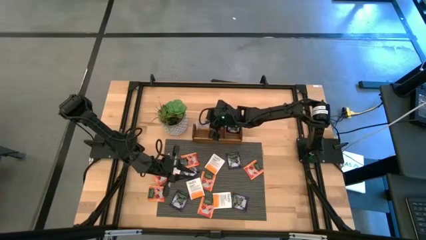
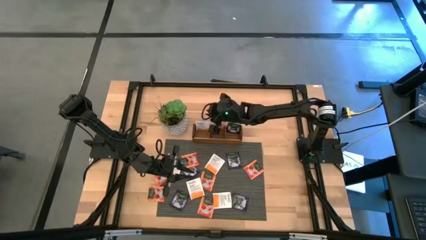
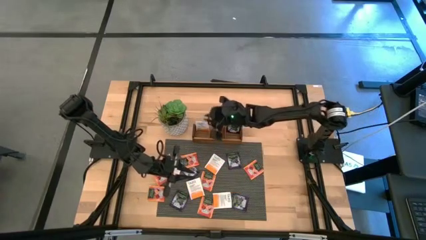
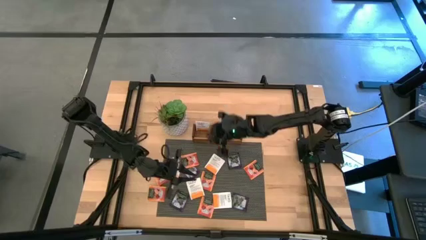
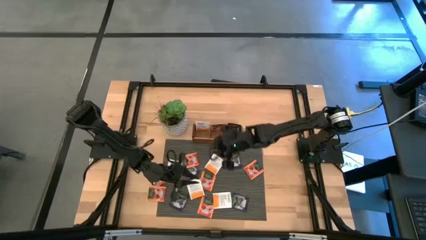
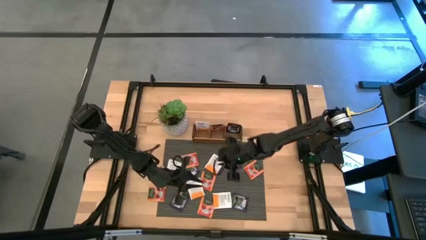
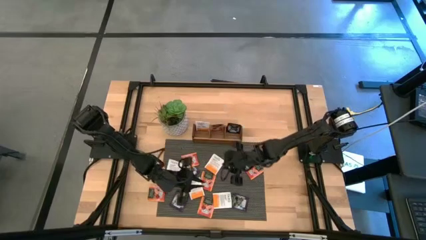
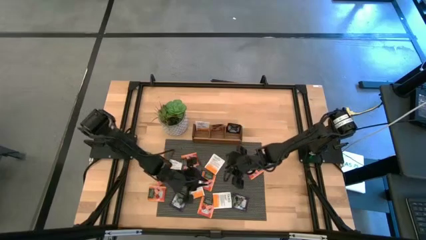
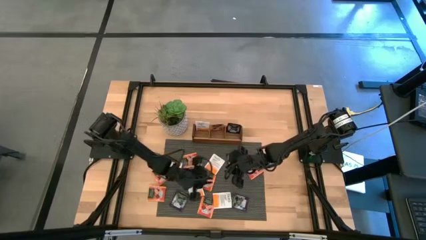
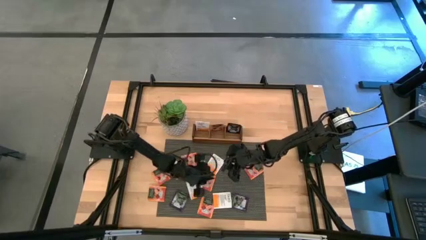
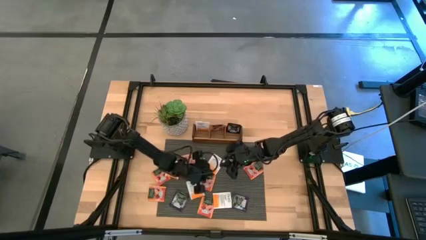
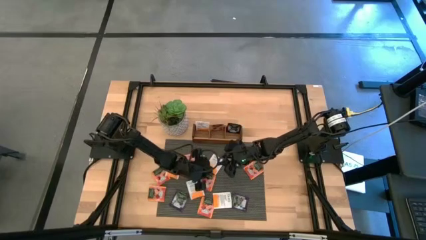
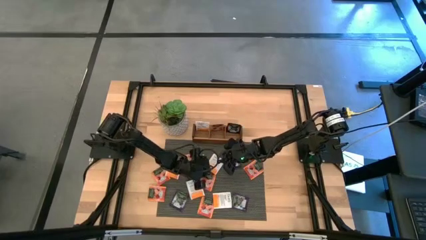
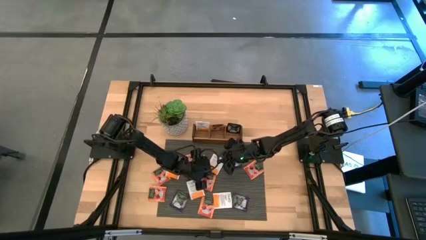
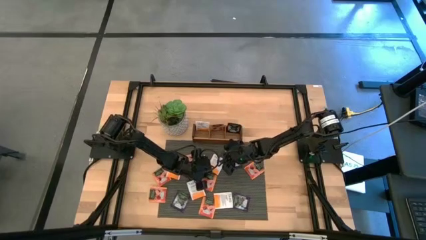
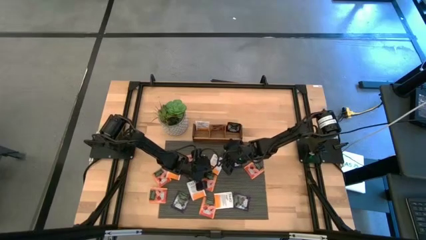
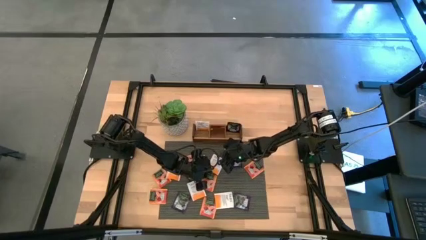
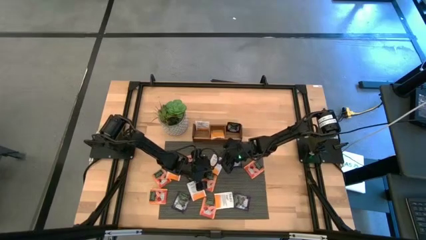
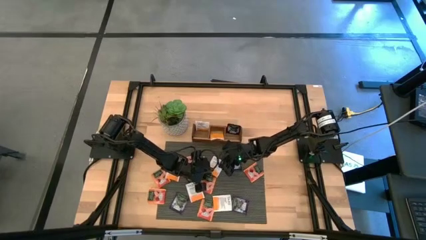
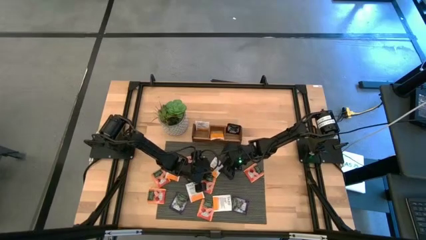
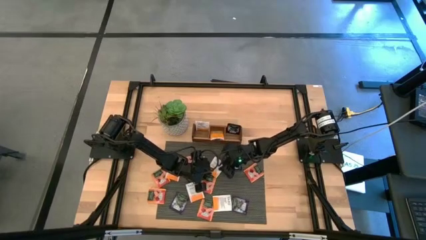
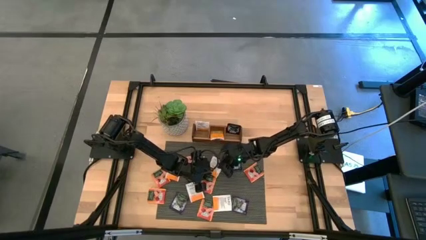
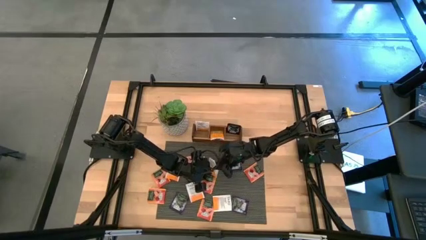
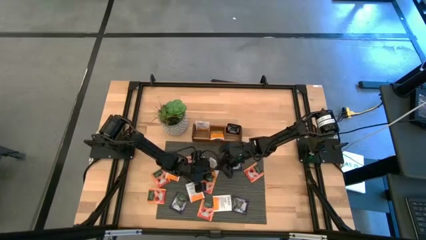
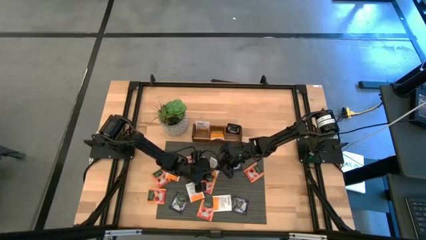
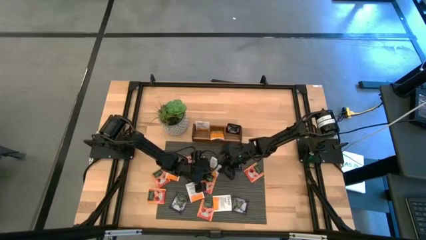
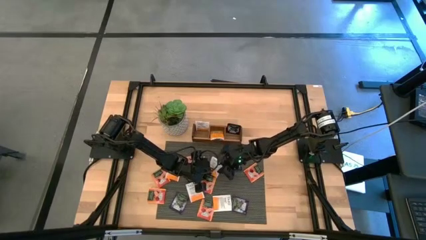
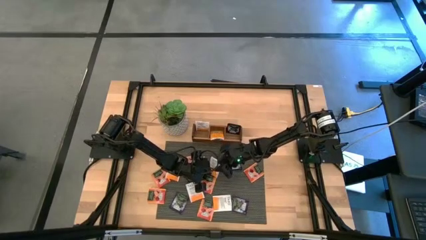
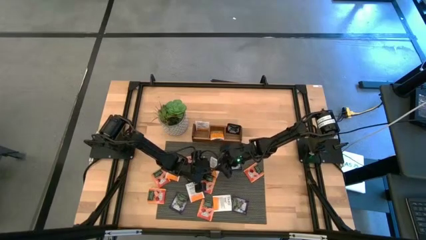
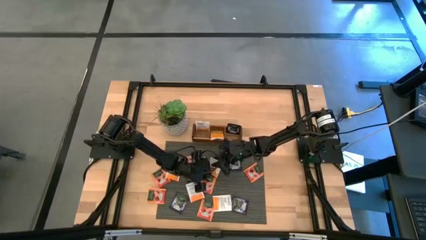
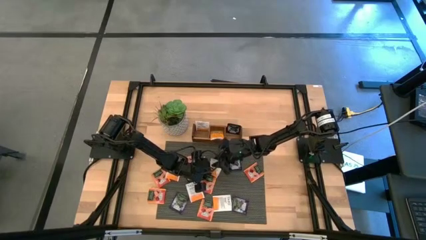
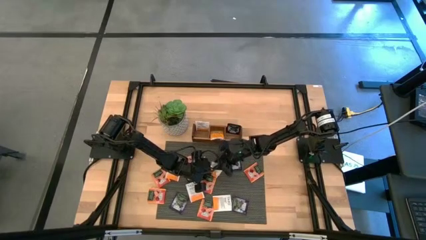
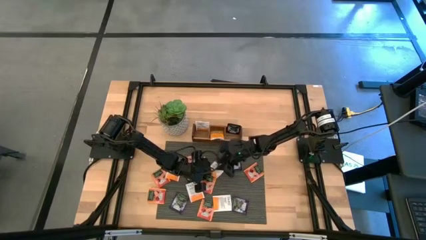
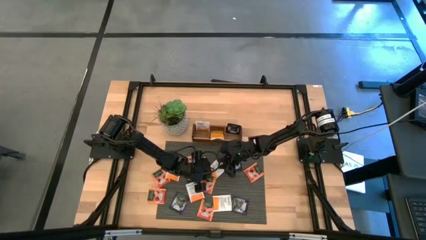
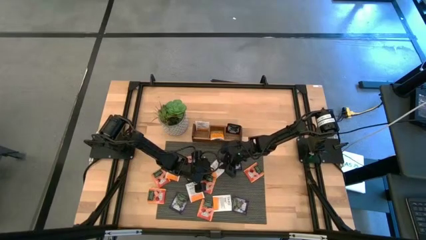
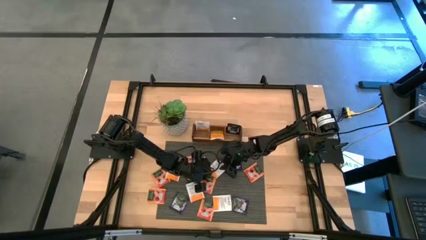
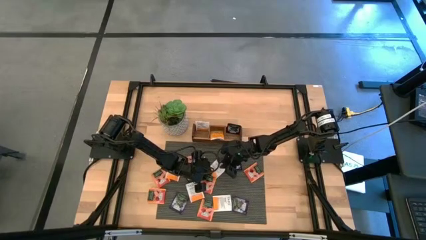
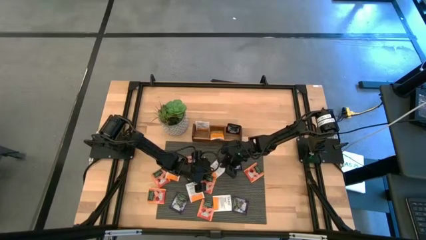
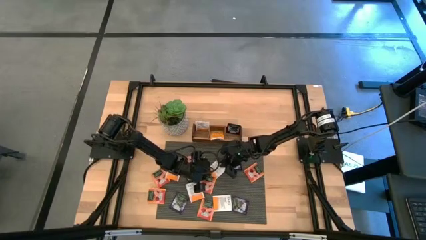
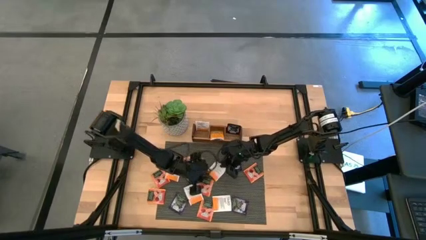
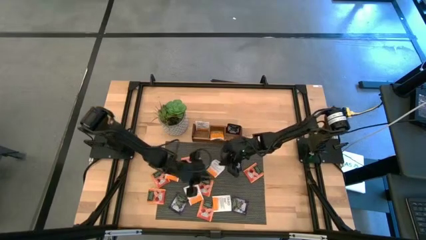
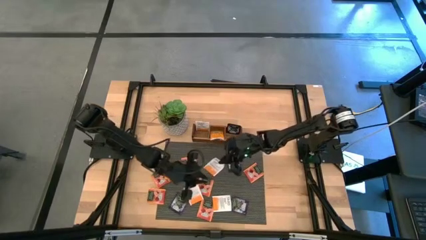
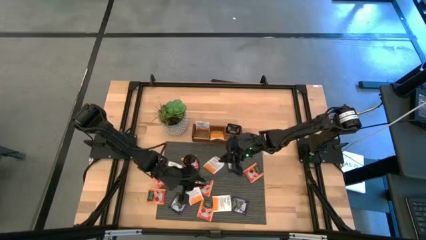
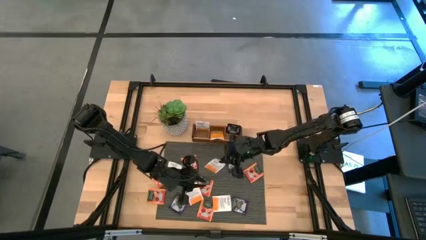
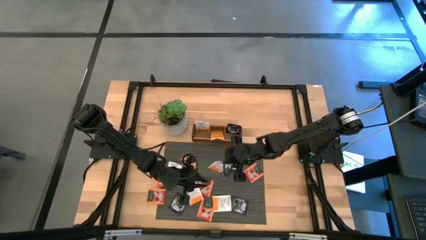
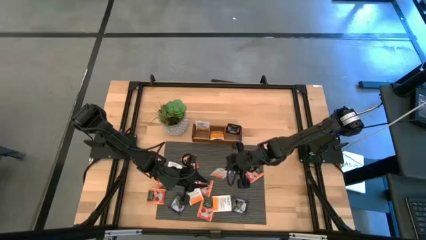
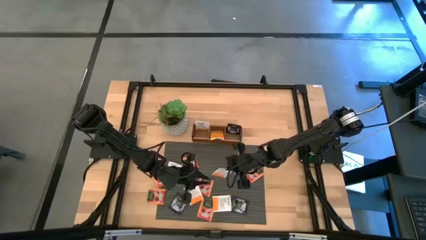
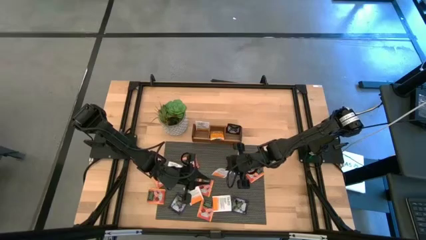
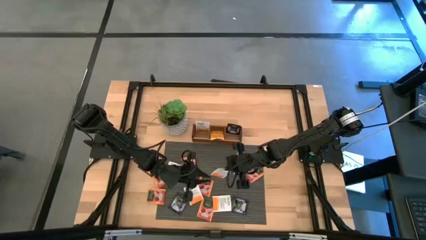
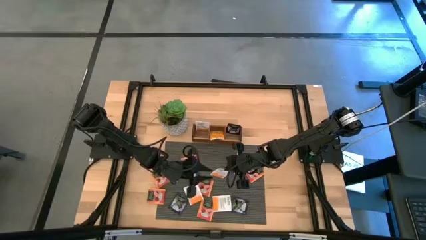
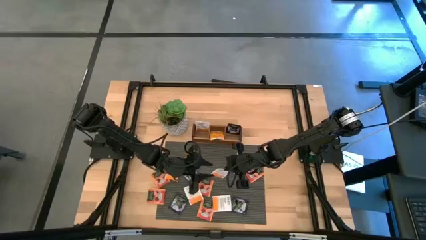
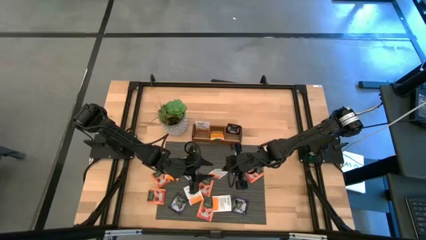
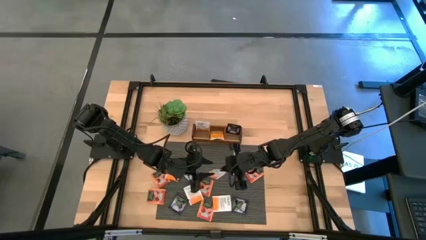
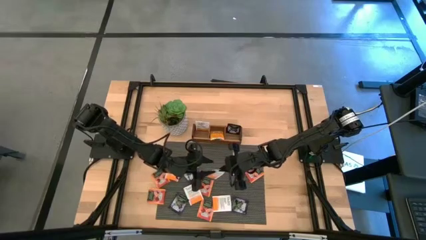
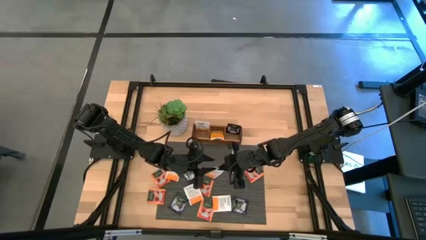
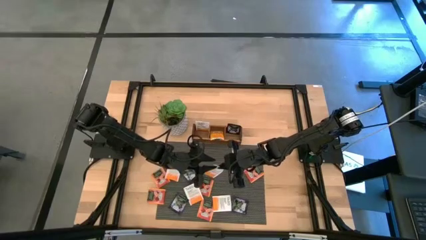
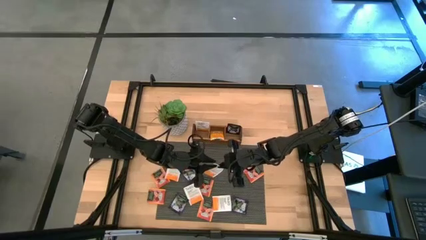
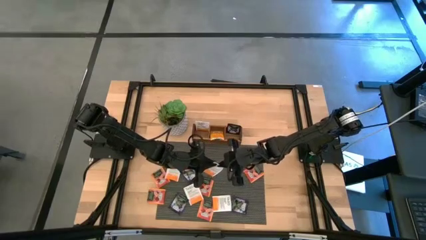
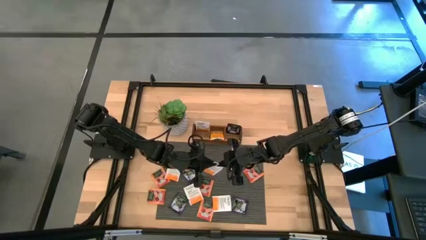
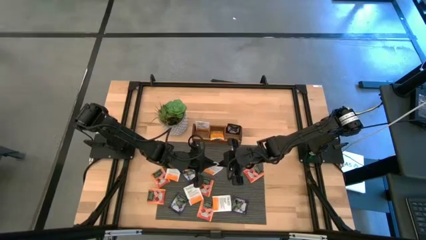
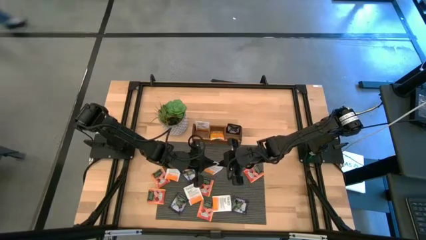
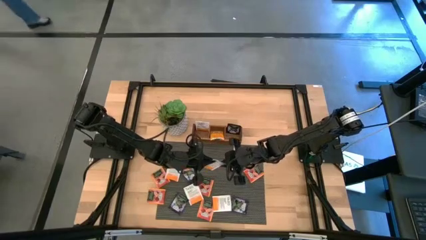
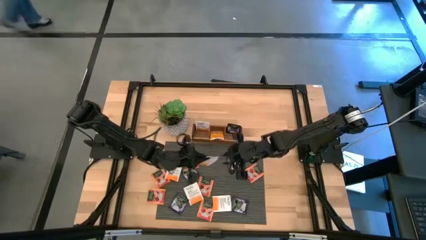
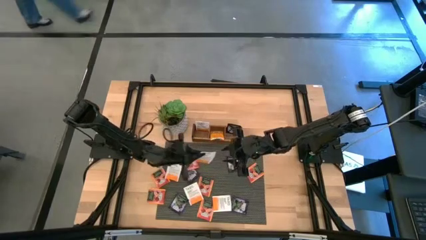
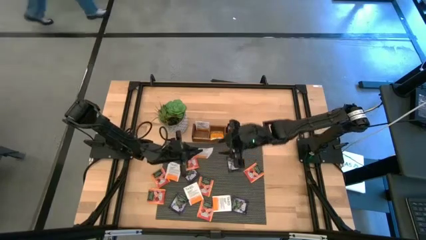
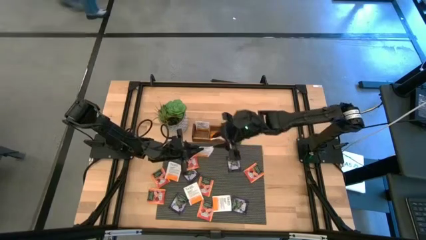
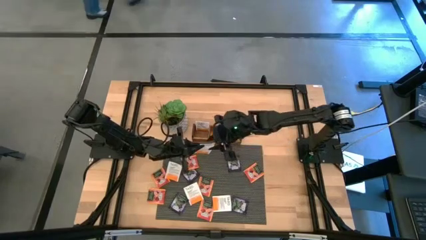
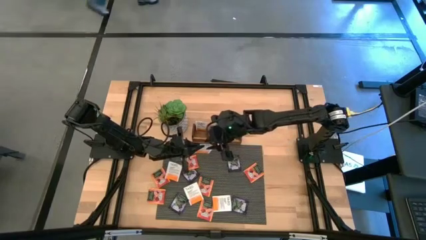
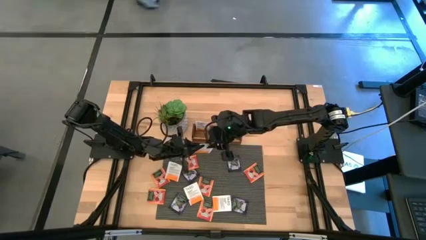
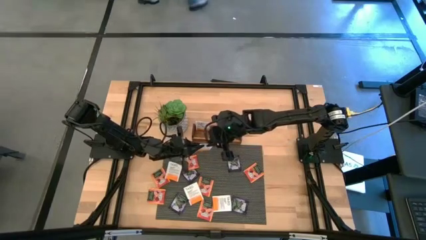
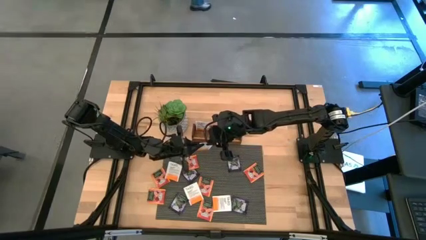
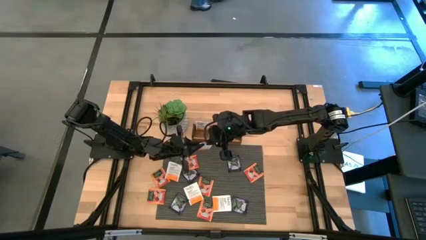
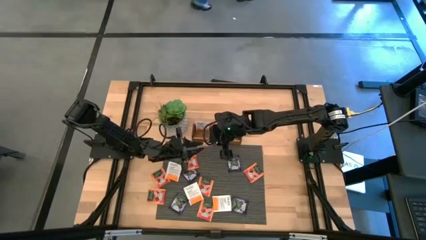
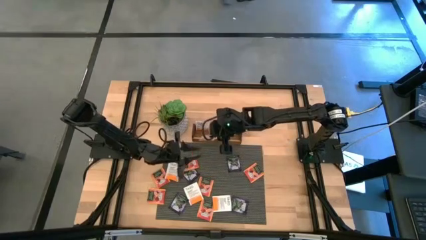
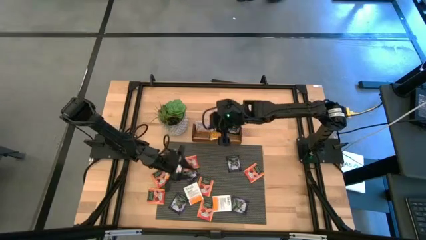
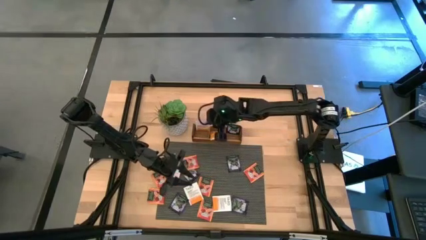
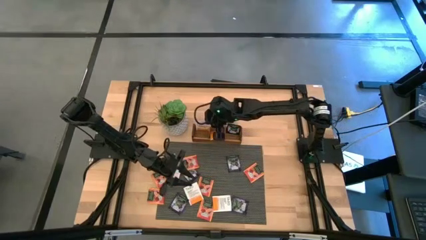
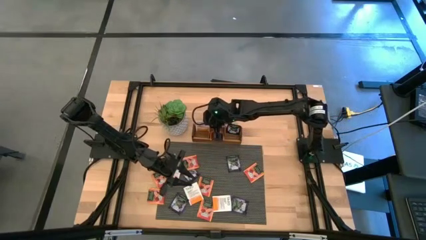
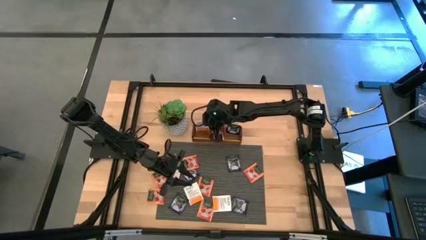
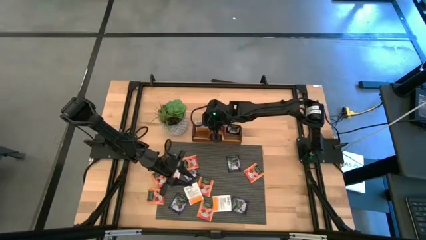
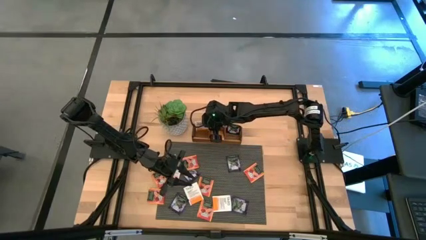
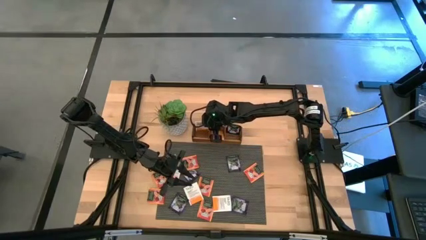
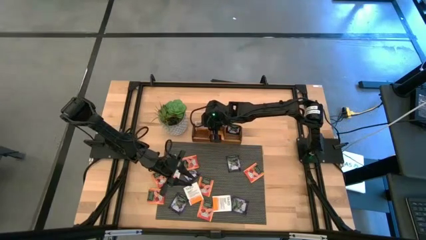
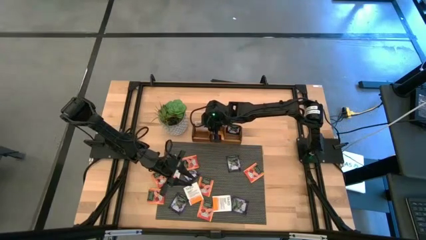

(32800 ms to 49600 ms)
Task: Pick & Place Tea
Put the white tea bag into the left section of the wooden organizer
